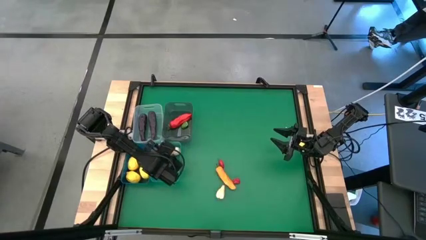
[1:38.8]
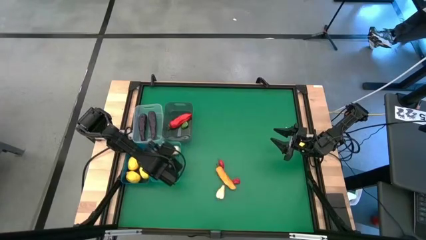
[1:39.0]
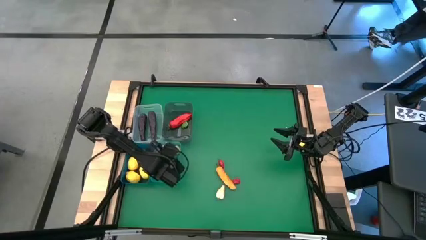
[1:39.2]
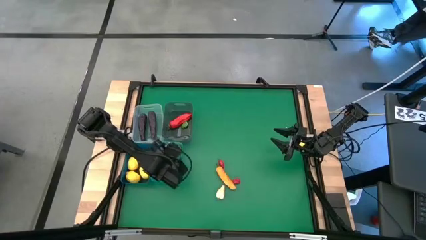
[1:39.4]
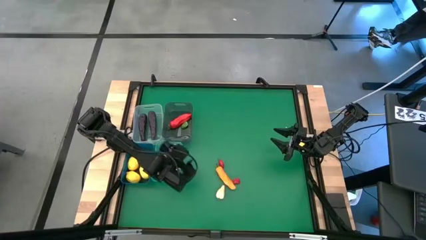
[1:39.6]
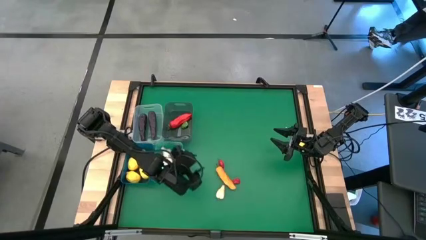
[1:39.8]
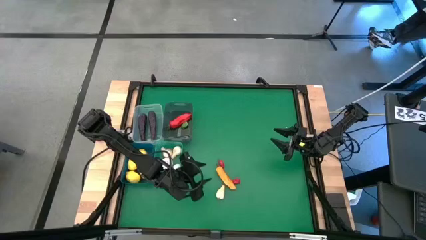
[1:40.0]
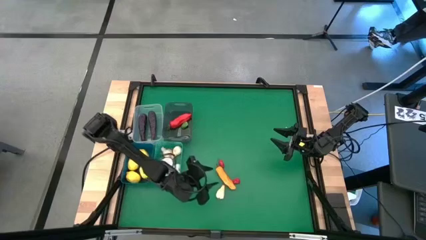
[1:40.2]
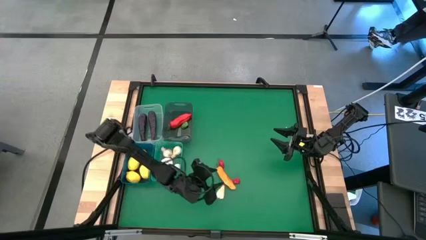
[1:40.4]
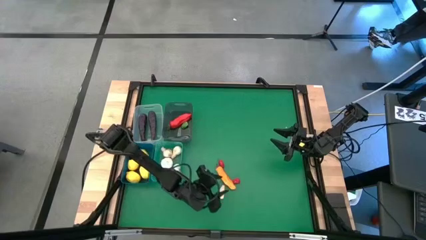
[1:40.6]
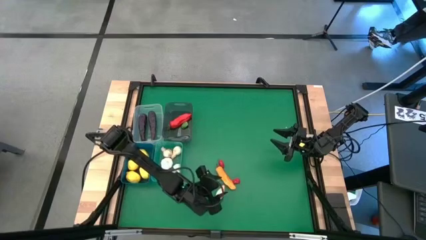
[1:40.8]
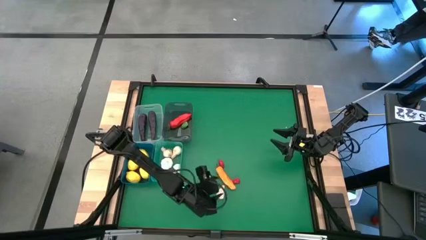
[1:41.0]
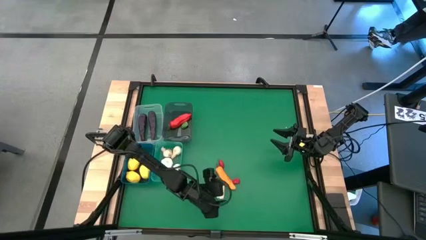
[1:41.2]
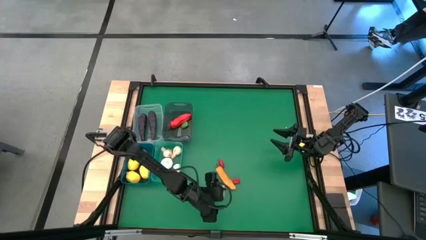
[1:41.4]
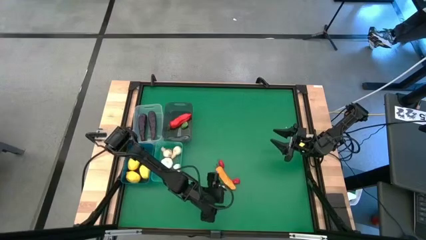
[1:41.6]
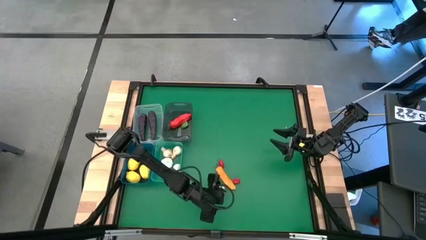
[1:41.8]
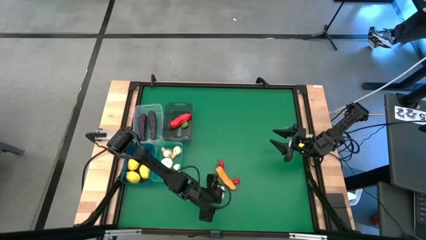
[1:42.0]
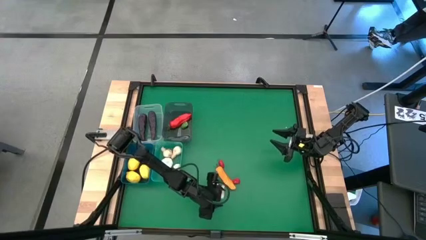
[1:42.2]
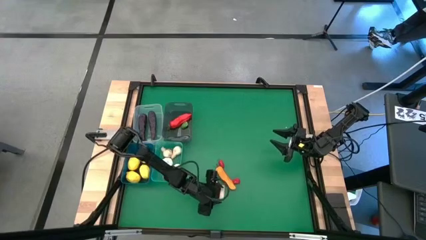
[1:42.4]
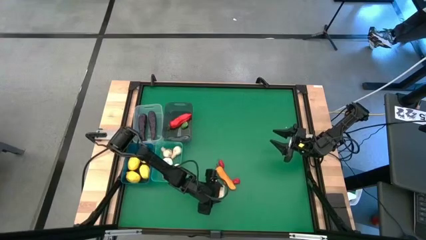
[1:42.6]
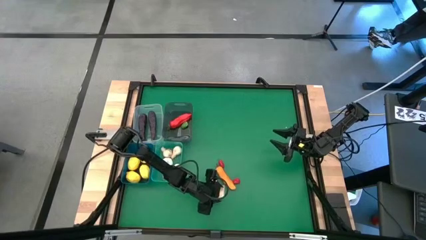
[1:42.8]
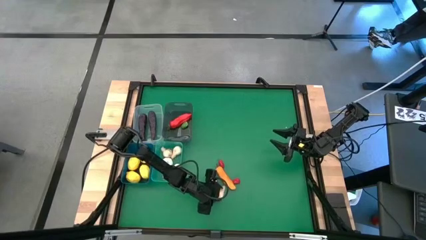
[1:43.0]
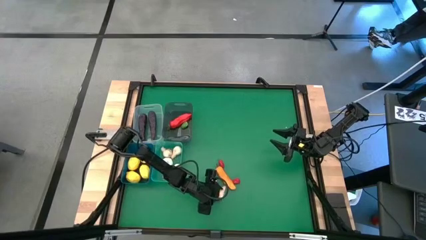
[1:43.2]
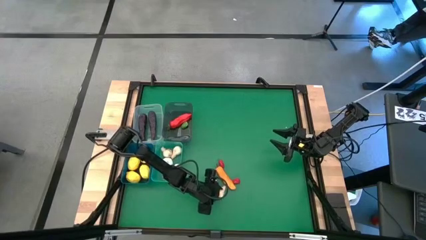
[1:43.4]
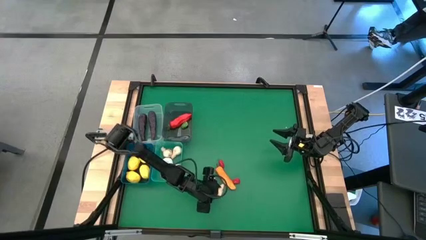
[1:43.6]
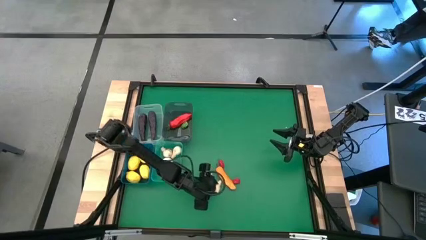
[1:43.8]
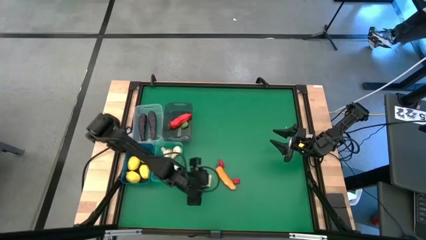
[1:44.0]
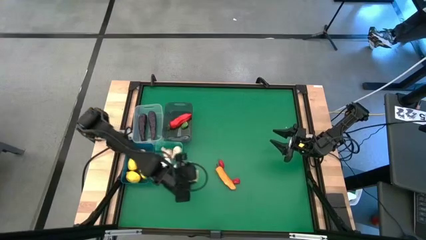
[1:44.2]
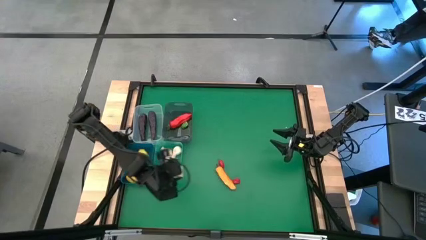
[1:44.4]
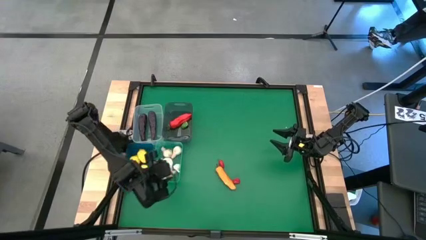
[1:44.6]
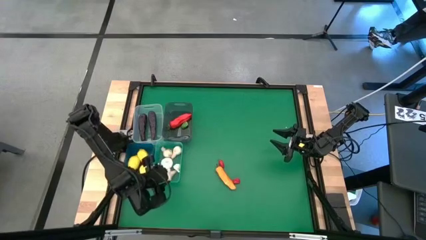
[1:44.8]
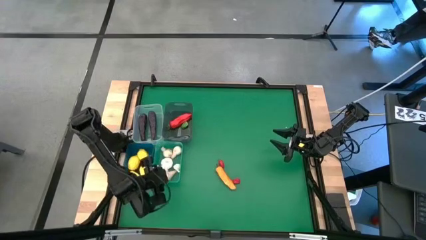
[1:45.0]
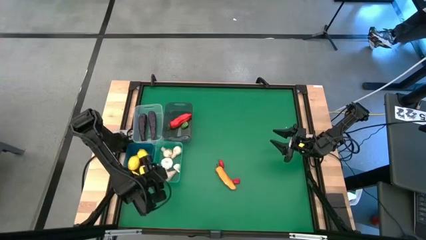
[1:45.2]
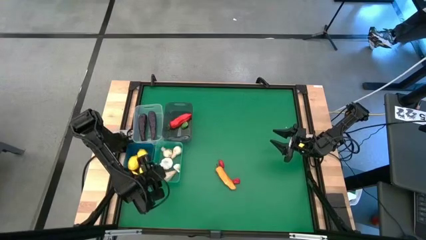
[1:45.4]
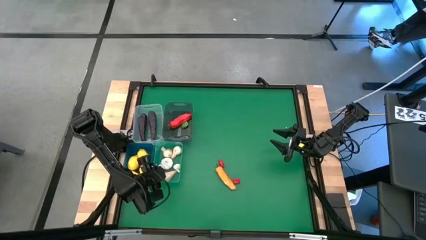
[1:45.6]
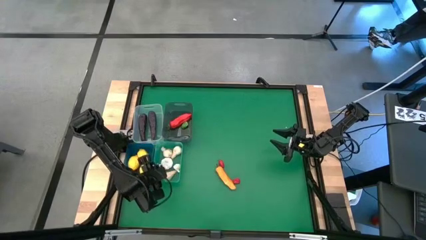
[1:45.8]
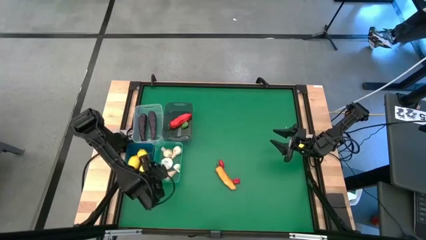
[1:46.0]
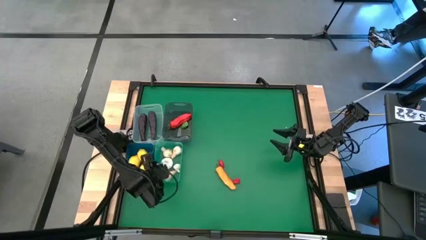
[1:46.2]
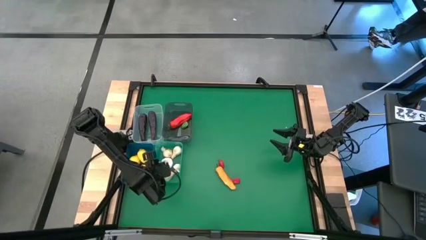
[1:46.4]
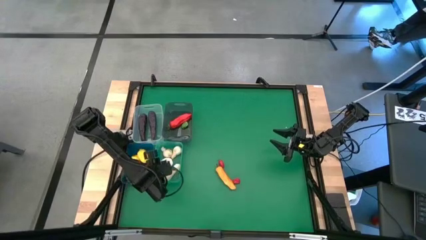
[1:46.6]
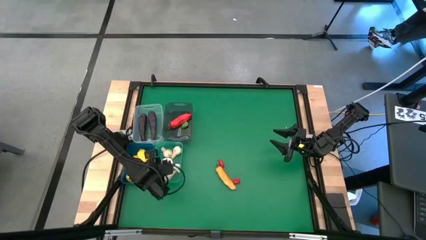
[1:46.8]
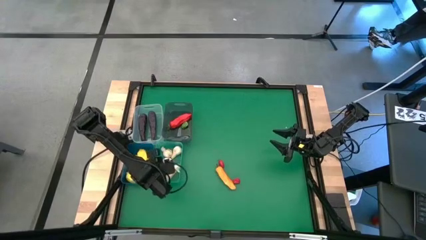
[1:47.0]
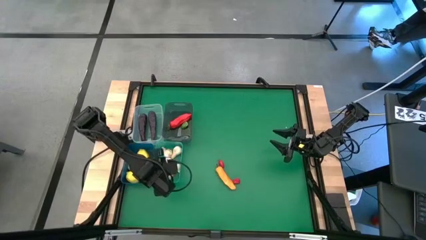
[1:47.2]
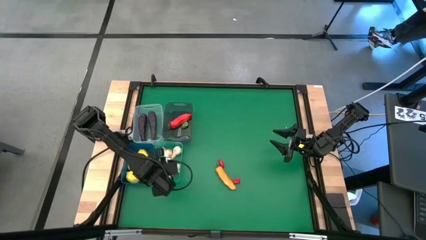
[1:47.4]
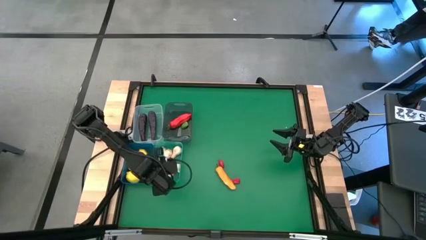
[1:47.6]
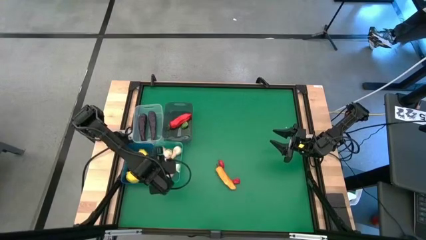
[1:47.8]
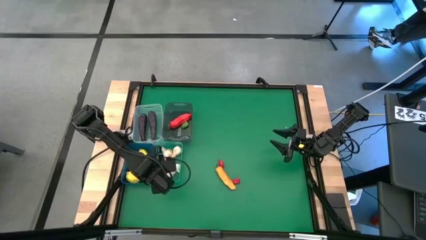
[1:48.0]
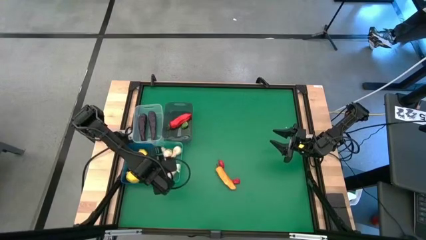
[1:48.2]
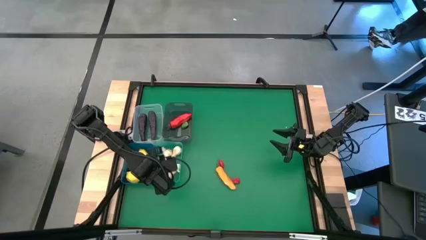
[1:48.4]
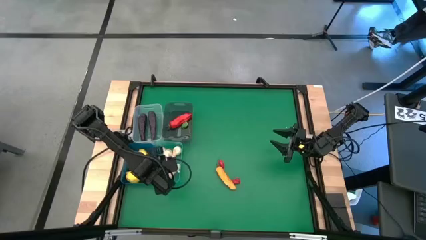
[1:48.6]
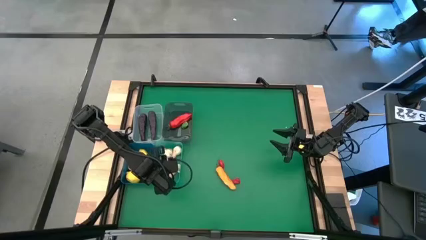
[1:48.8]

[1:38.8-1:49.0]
Task: Sort produce into baskets
Put the white garlic into the green bin

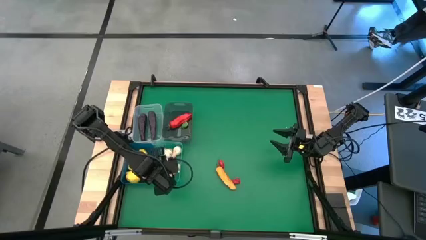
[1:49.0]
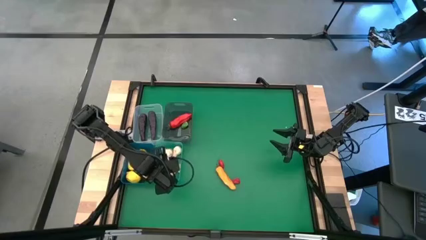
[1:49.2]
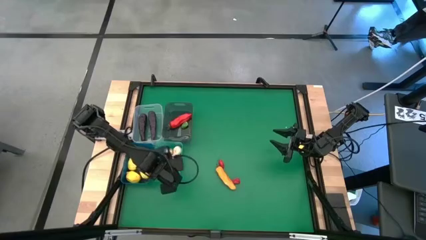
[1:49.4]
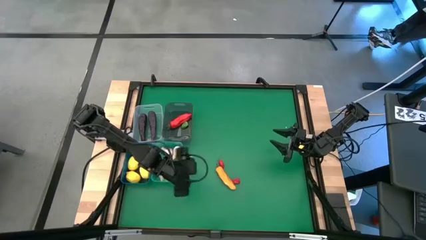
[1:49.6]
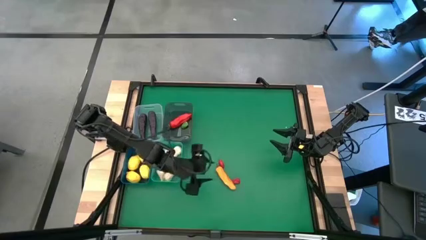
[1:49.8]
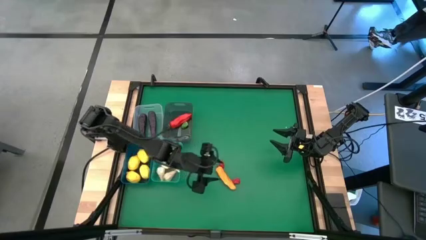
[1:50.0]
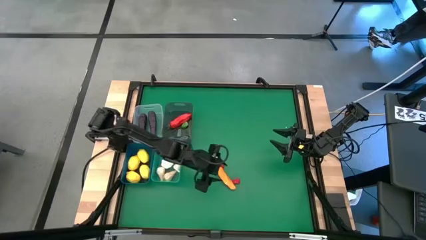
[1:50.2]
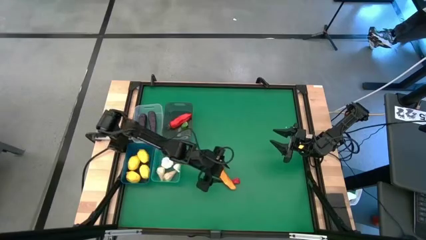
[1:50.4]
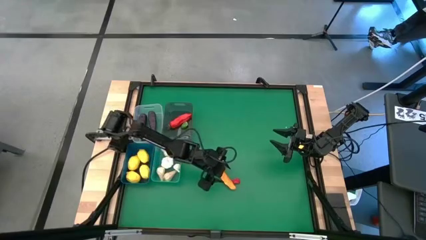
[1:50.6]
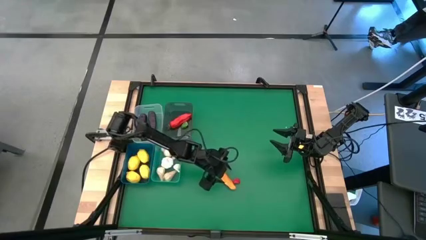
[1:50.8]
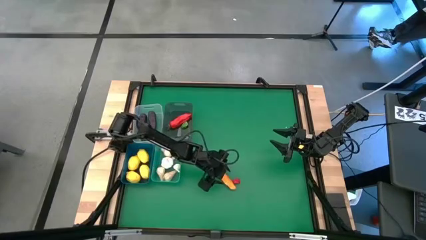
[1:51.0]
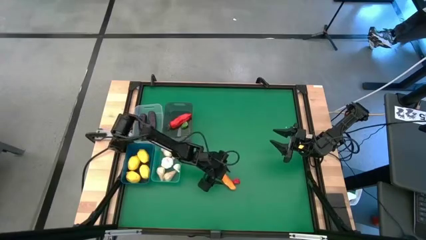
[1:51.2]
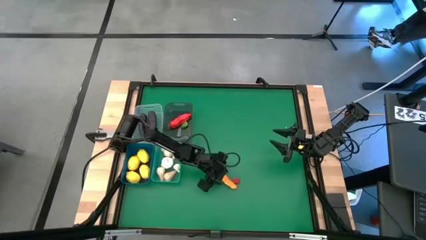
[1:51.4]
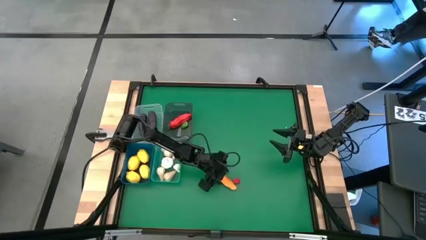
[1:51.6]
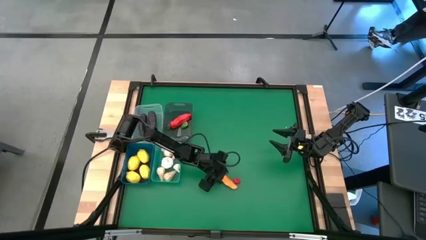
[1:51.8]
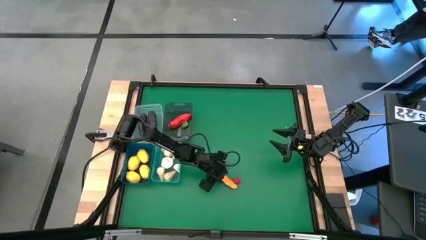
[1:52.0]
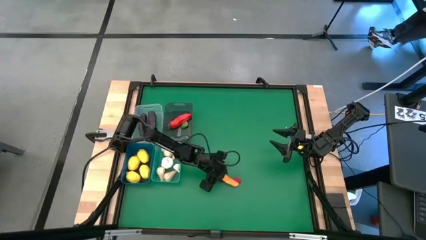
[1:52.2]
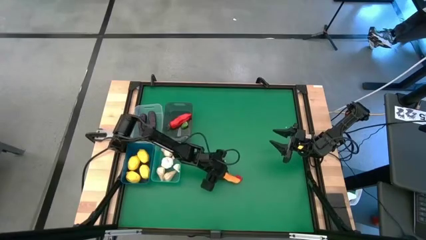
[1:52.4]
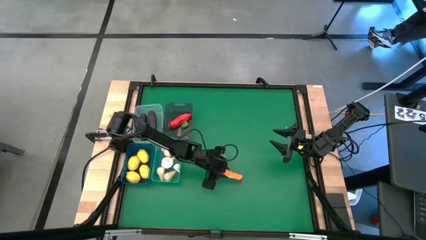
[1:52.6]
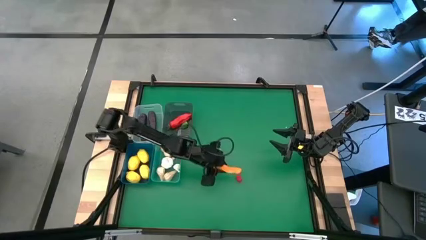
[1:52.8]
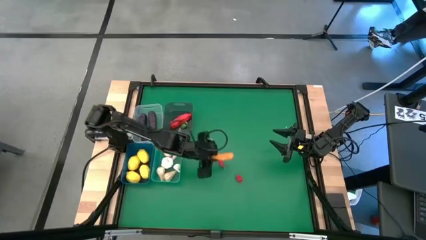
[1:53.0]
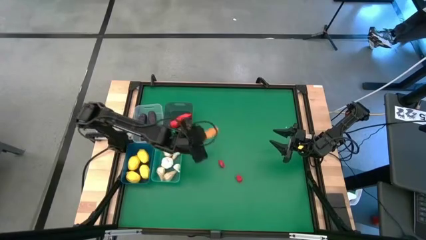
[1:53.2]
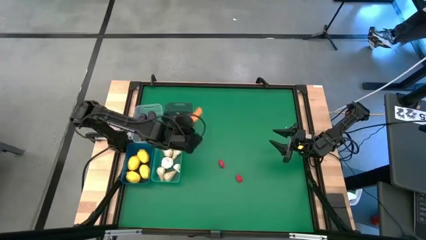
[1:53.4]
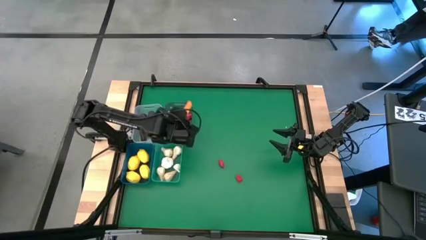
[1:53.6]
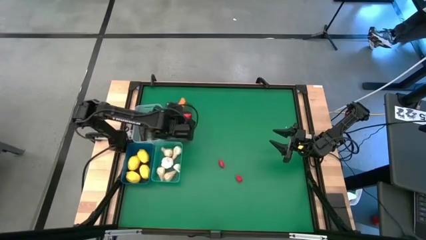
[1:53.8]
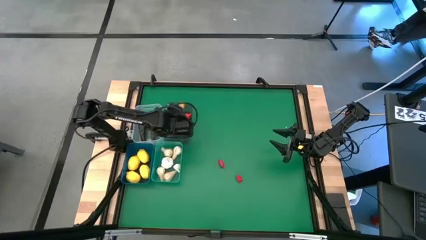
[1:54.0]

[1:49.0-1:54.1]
Put the yellow chili pepper into the black bin

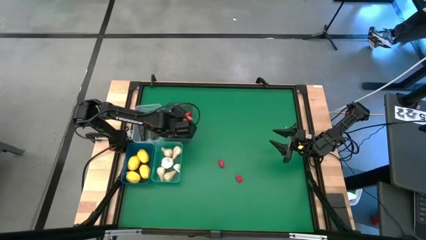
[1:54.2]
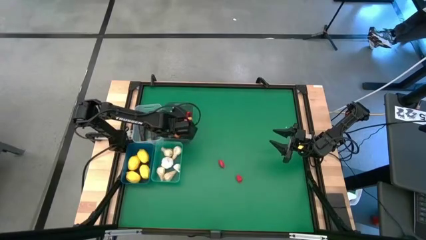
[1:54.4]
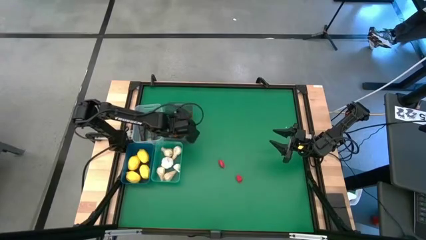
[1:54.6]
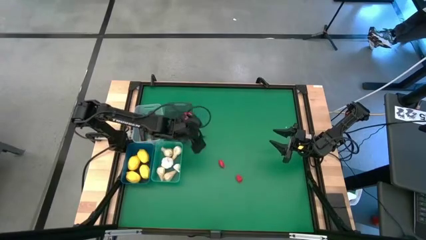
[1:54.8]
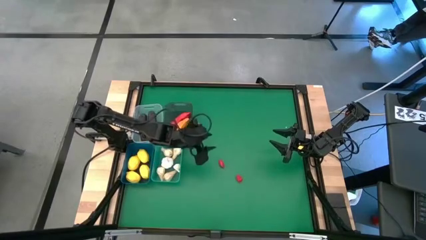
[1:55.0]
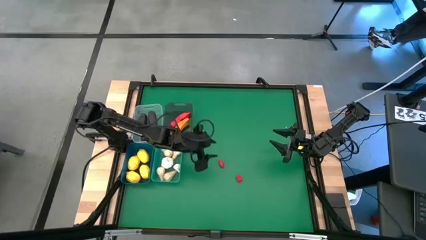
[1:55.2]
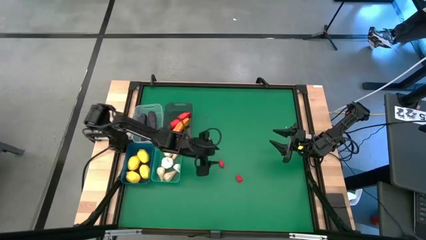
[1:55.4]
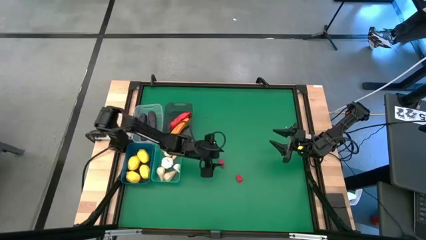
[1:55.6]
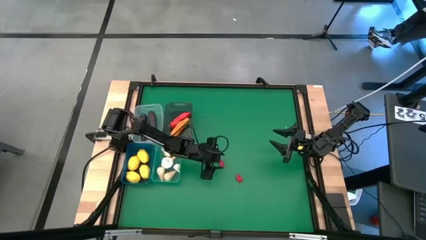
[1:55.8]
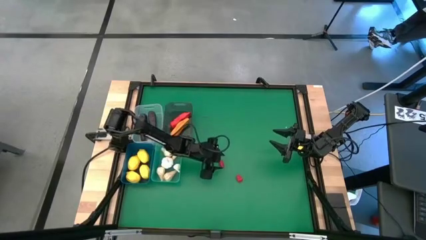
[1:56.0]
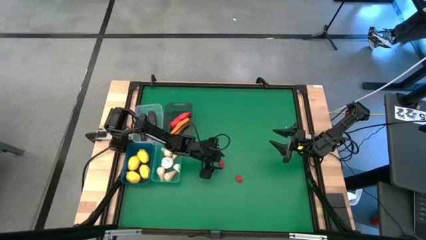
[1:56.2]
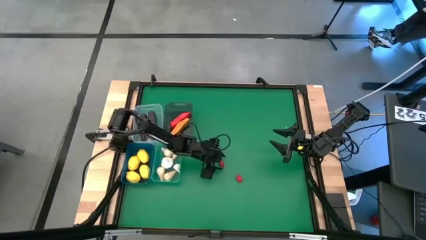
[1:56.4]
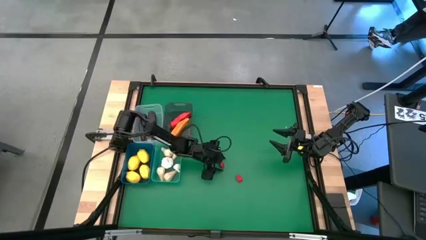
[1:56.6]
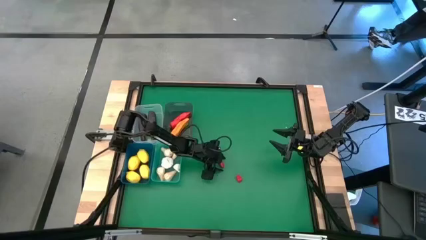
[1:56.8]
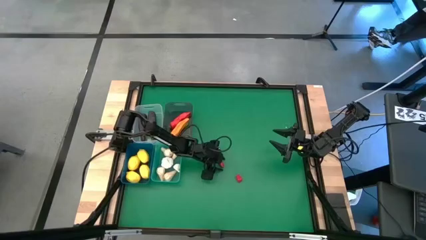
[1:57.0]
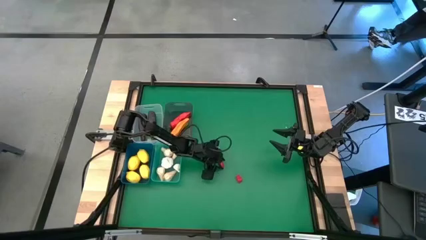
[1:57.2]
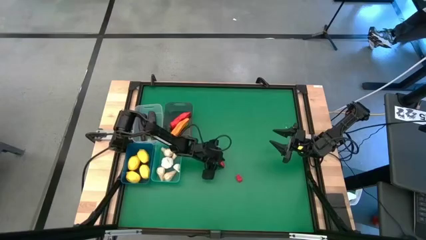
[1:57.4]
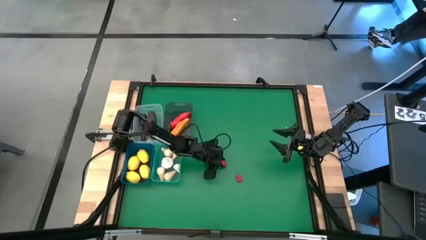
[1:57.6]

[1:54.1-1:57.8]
Put the red chili pepper into the black bin
